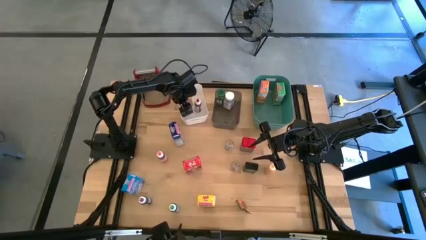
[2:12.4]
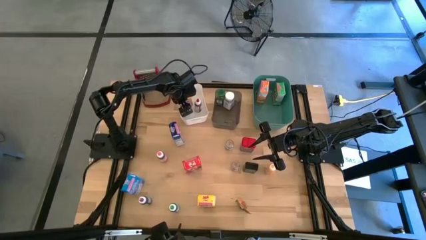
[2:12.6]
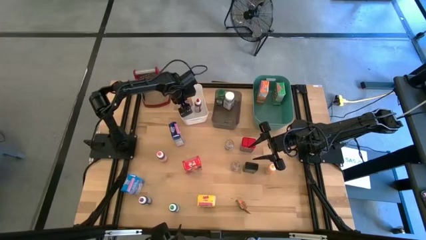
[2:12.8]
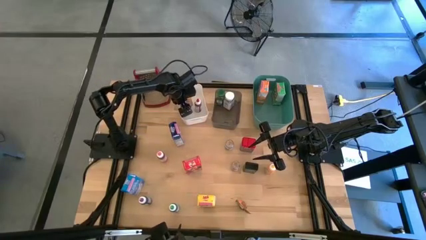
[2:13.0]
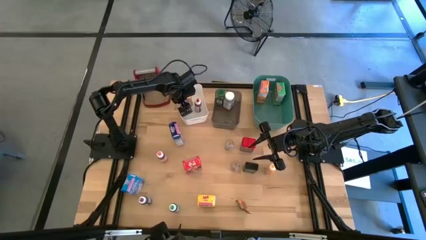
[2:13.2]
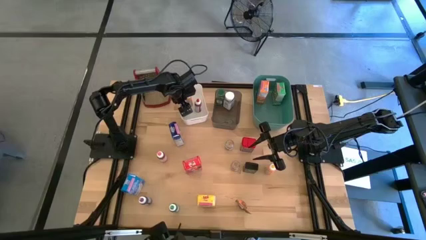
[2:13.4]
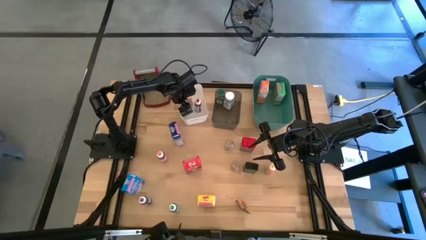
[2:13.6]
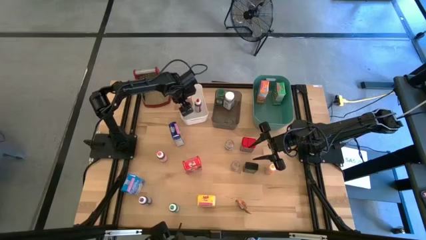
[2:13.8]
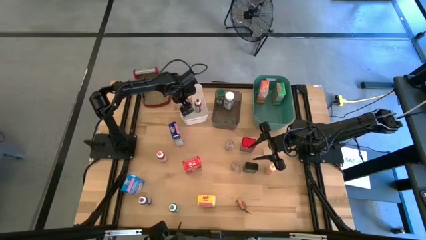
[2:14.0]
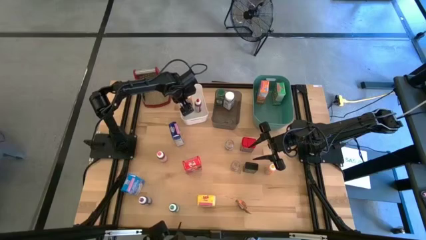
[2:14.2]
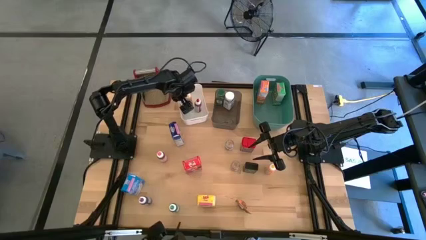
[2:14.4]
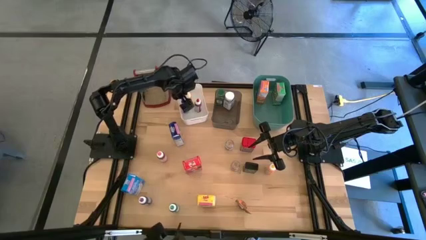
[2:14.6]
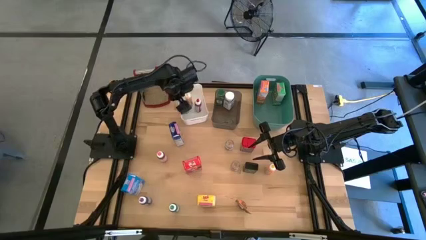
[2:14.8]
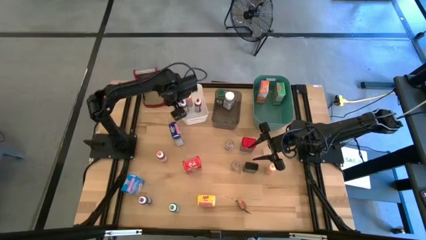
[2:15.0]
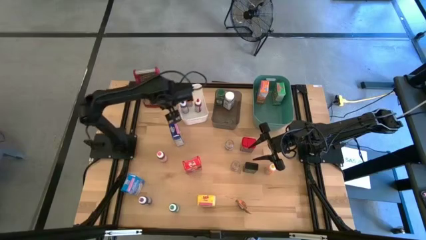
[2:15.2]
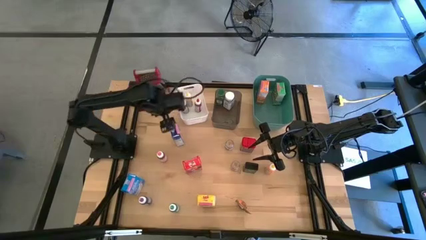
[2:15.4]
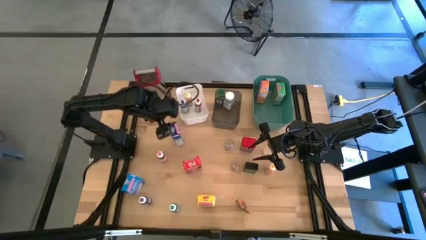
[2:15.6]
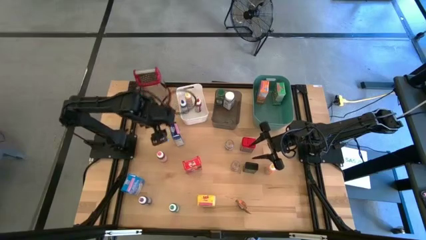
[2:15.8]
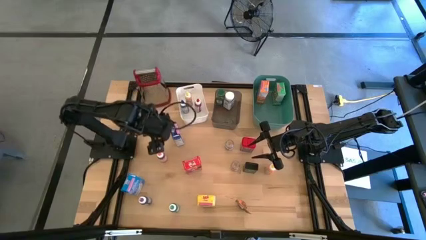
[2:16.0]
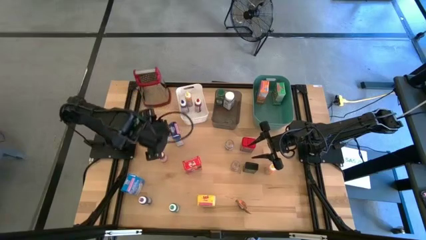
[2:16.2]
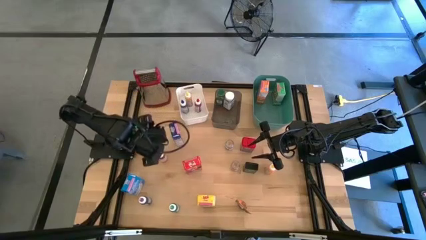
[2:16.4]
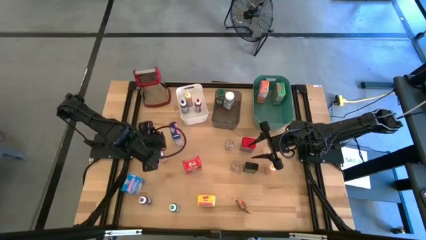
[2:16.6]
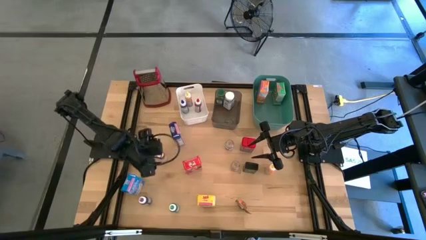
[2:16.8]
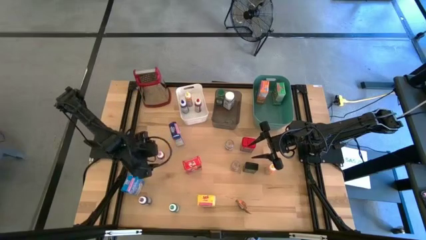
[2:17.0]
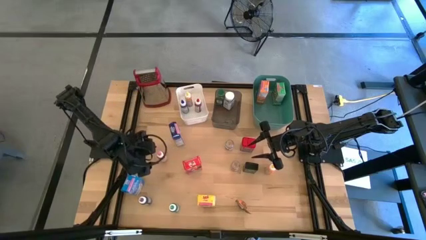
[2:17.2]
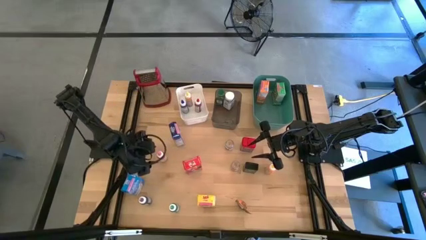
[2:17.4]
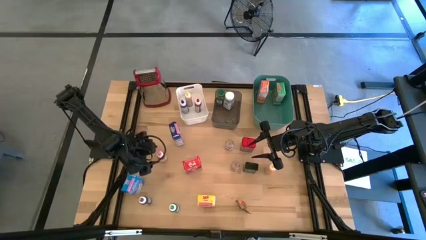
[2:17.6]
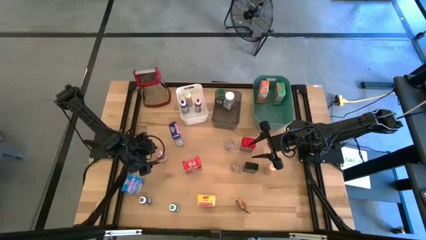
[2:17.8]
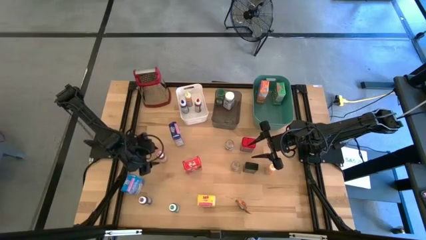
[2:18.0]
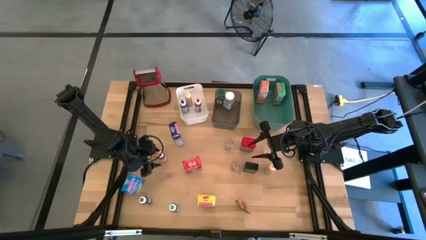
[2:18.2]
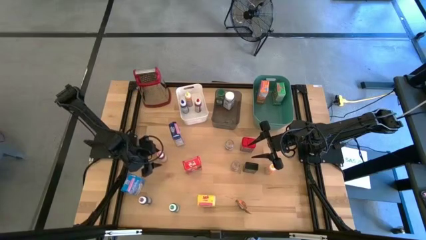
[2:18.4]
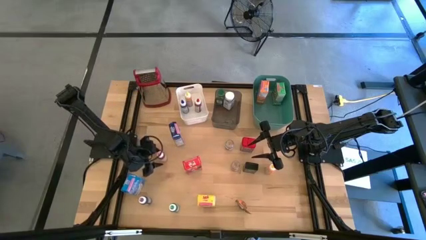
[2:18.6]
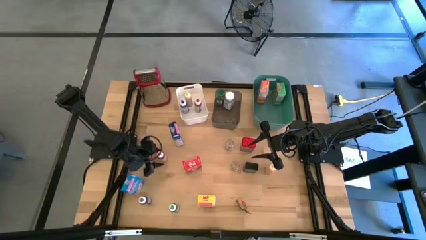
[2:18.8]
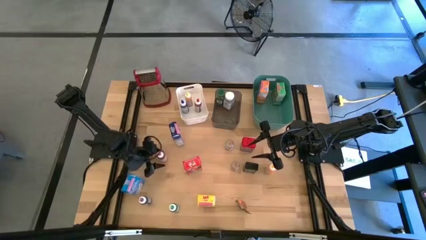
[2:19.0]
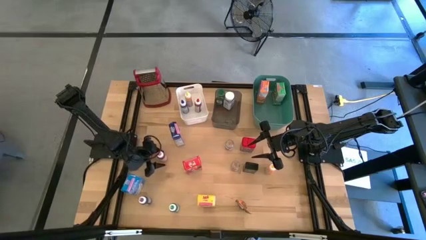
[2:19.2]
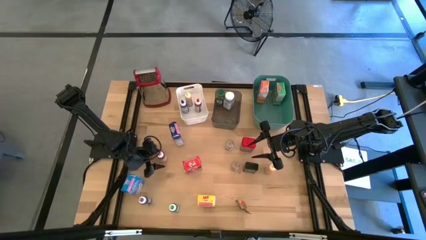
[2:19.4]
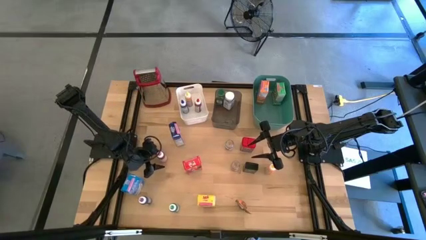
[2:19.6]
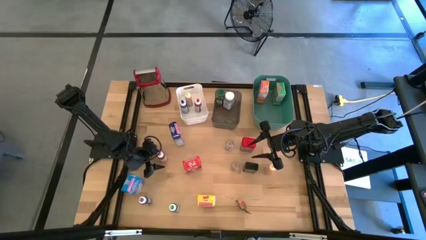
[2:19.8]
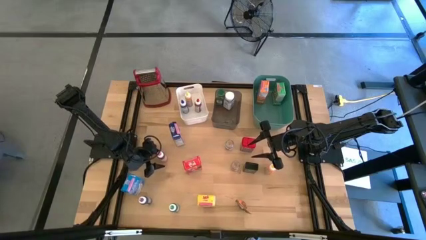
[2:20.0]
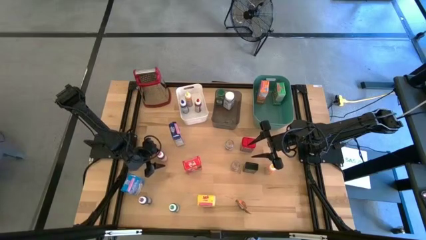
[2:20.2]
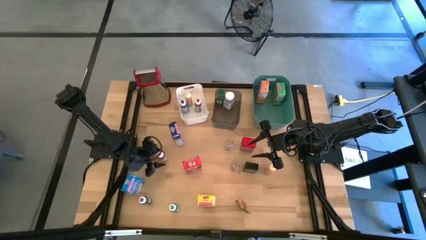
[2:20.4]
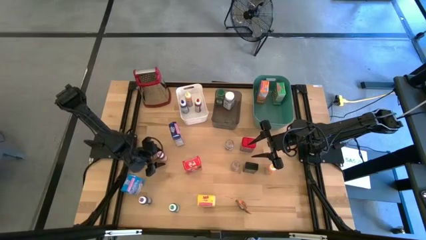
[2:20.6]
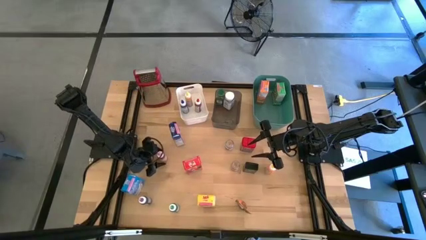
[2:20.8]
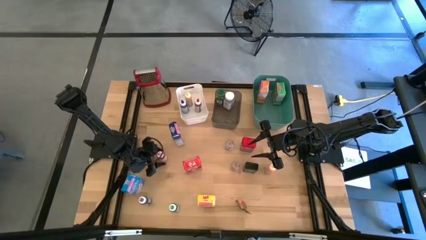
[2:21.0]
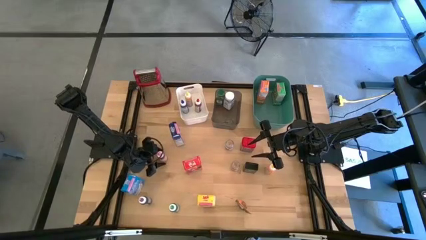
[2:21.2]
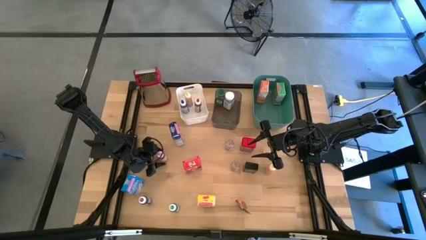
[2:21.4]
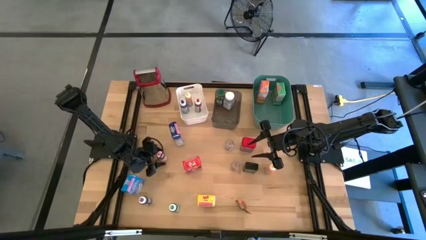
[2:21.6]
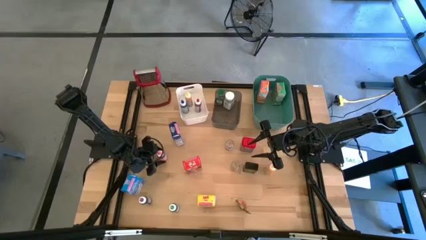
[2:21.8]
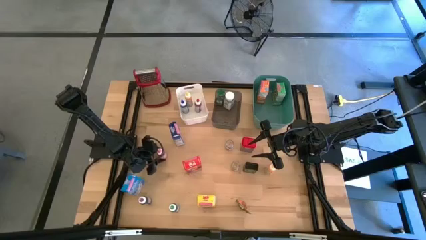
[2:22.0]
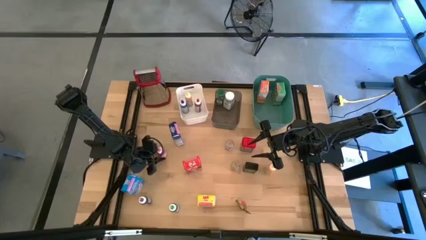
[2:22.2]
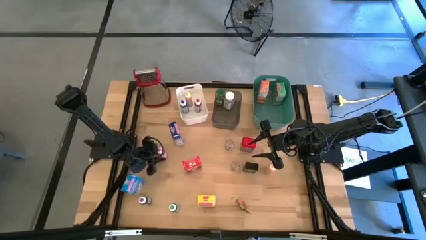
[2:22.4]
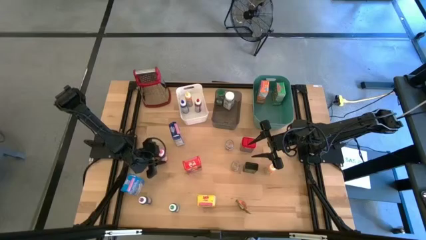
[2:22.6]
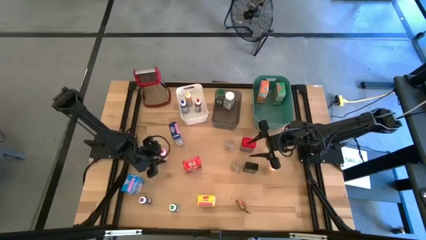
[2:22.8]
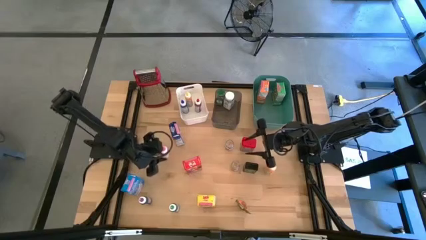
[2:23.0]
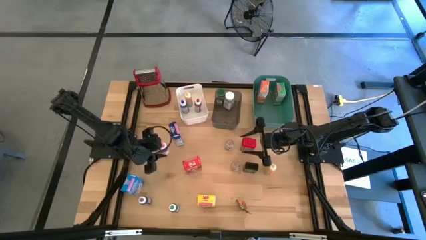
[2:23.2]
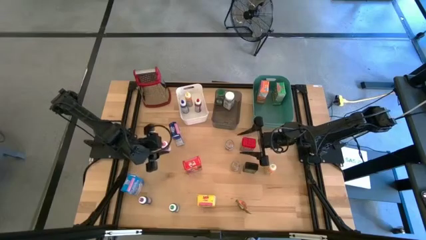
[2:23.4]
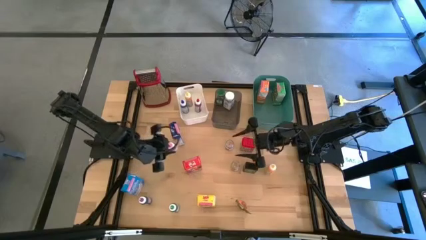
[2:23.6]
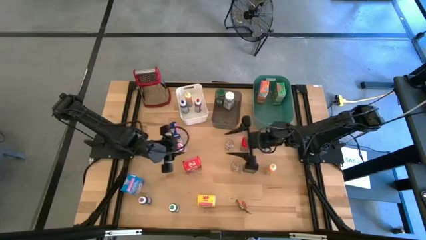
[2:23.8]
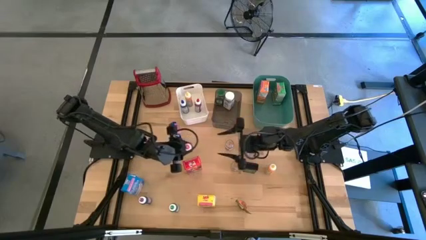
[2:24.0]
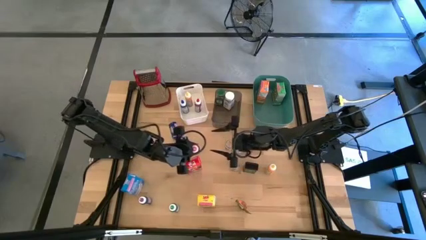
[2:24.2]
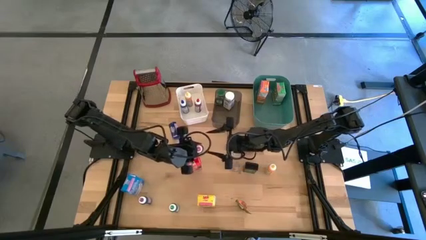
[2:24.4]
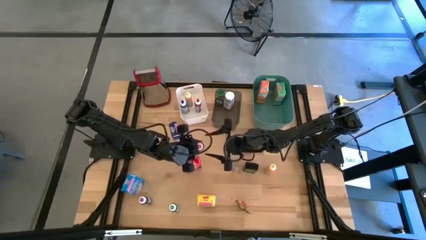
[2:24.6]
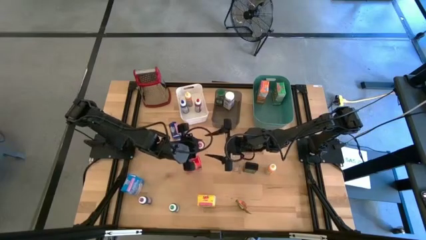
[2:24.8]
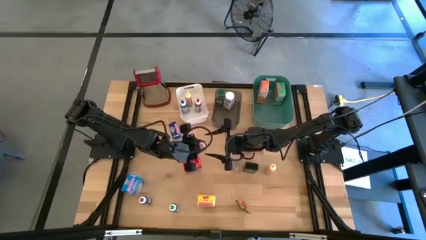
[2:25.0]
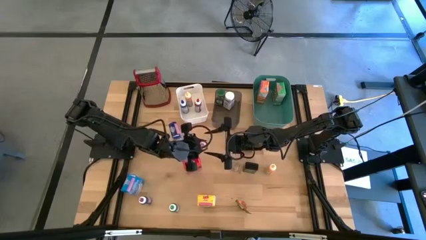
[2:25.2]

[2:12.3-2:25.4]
Task: Pick & Place Kitchen Items
Put the pink food coloring into the white bin

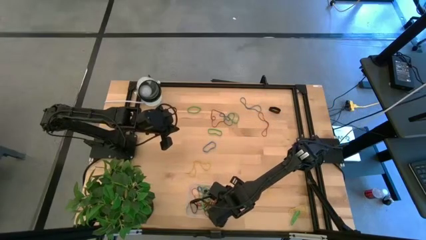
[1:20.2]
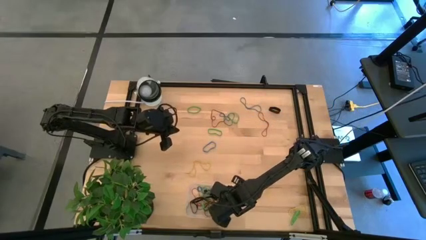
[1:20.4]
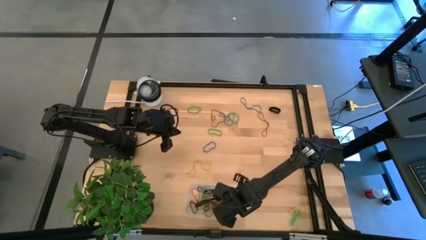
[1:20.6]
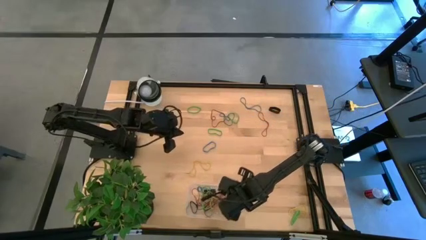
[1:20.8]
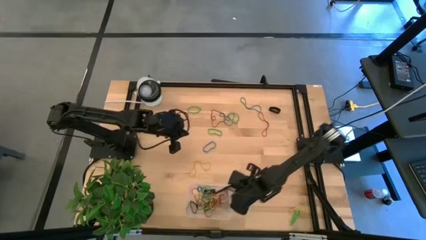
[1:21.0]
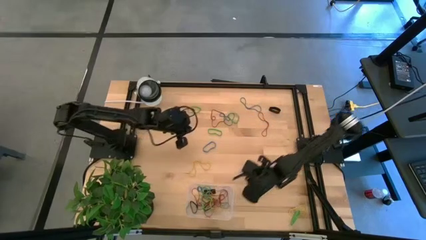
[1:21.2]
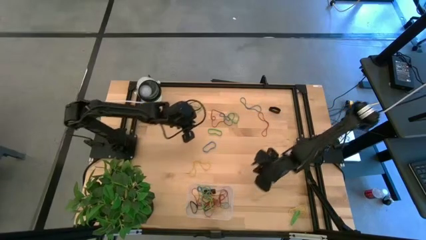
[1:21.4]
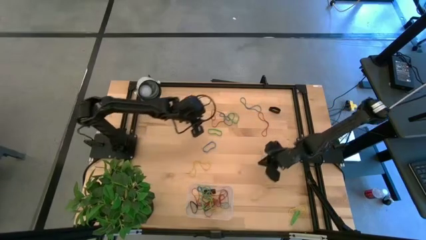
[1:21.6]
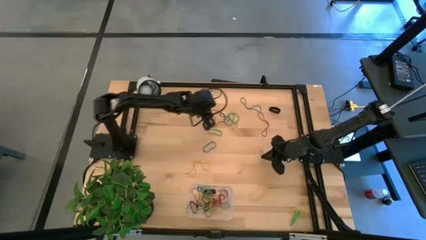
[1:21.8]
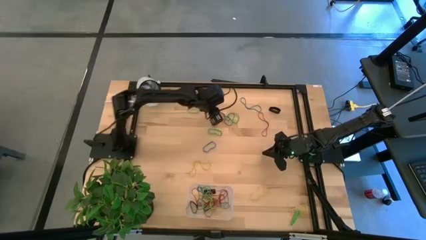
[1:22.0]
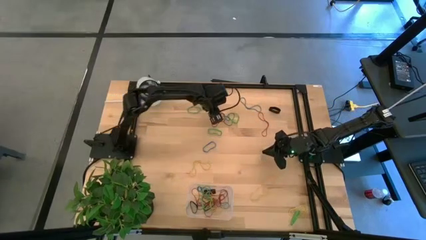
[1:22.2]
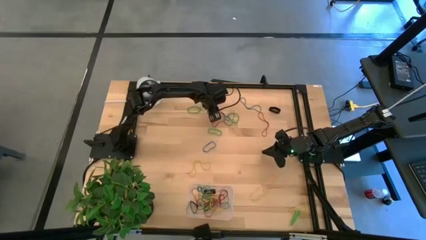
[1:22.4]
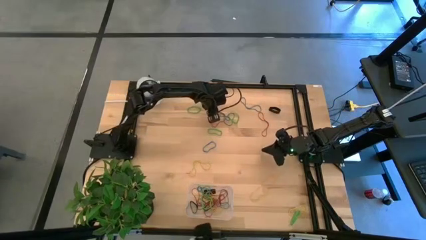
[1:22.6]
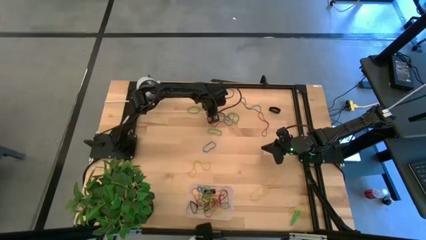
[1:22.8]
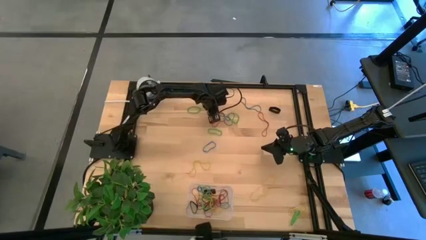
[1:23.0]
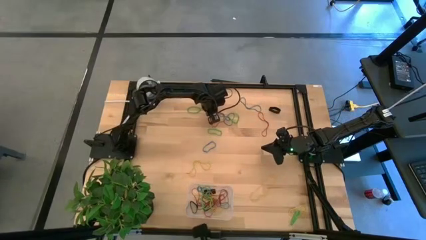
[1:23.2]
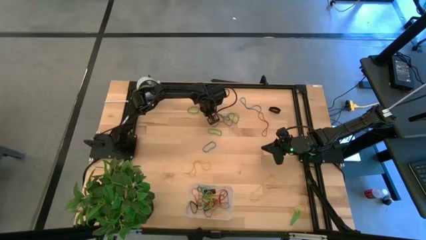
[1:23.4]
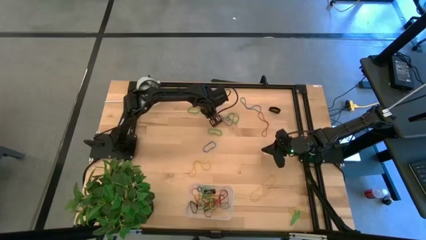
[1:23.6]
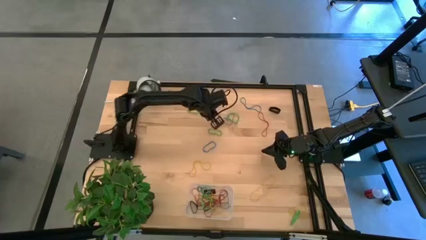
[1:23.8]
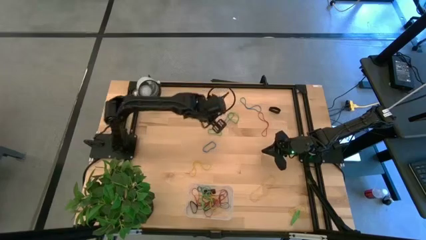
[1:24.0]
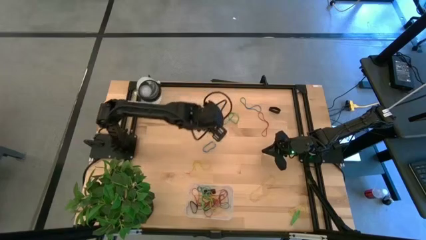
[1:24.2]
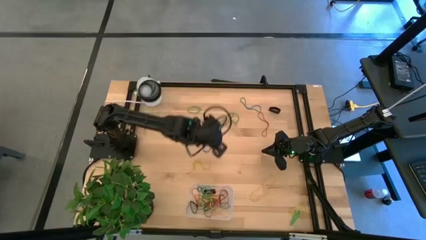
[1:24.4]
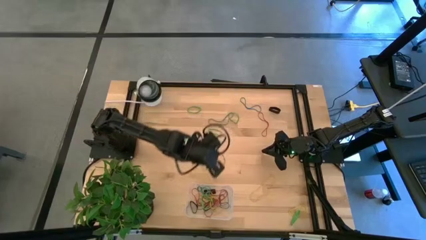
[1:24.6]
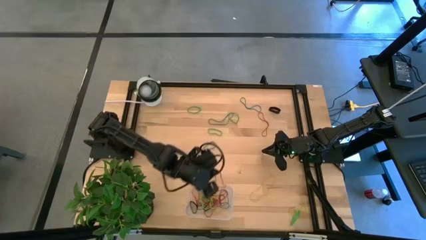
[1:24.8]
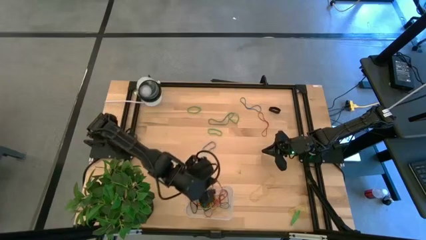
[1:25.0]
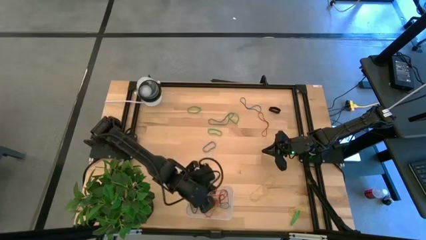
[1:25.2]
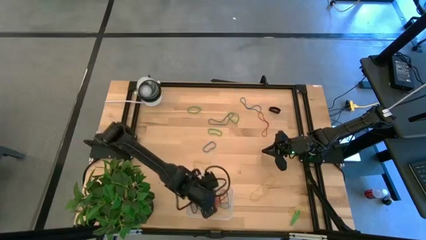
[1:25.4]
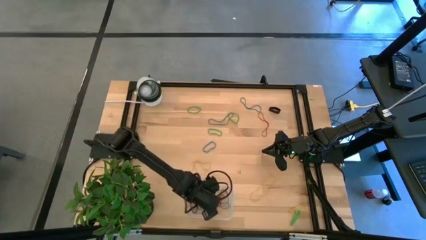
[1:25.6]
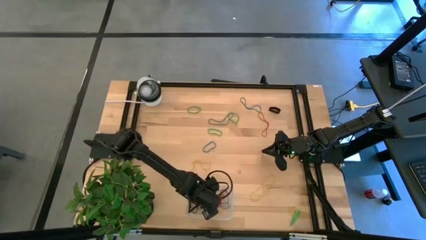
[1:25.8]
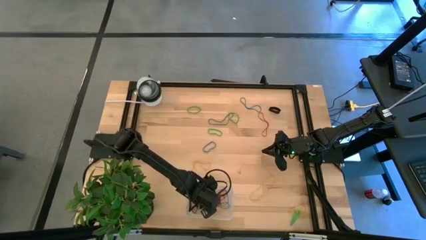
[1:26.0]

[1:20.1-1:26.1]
Task: Pick and place rubber bands into bin
Put the red rubber band into the transparent bin
